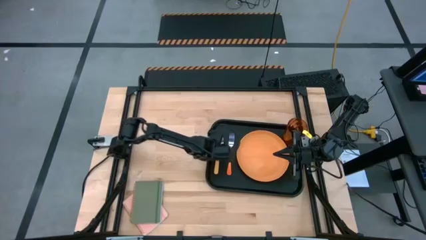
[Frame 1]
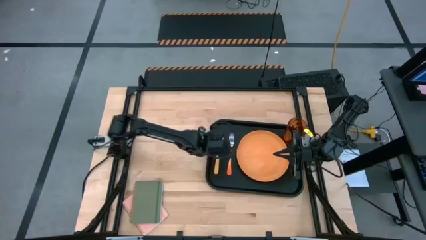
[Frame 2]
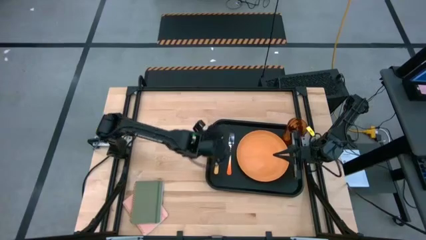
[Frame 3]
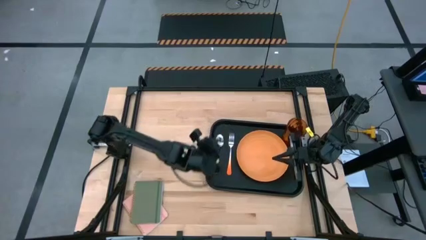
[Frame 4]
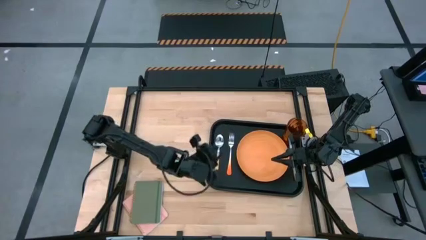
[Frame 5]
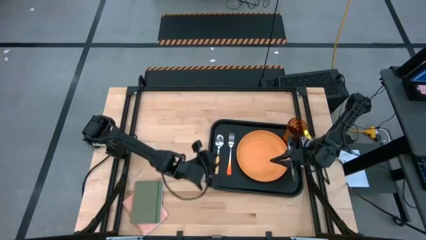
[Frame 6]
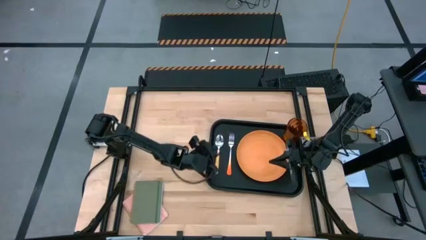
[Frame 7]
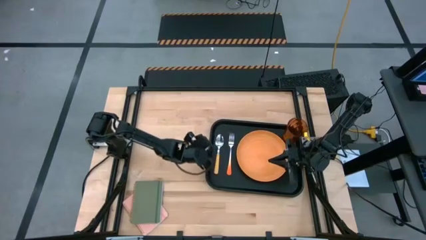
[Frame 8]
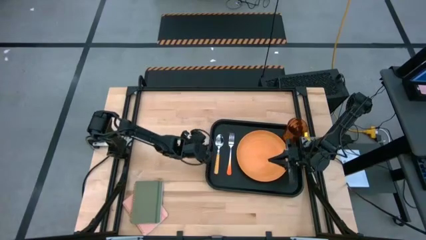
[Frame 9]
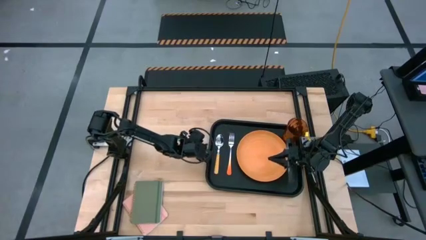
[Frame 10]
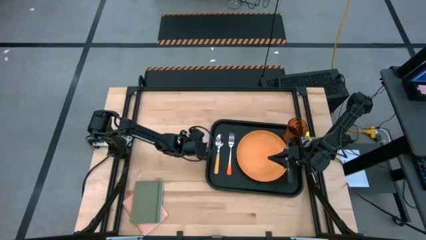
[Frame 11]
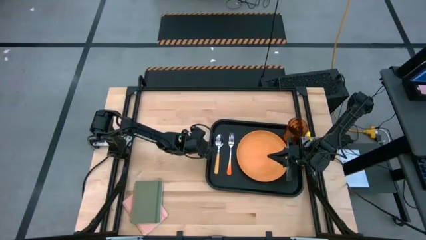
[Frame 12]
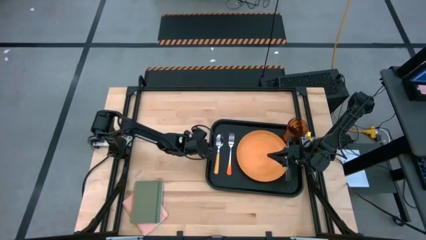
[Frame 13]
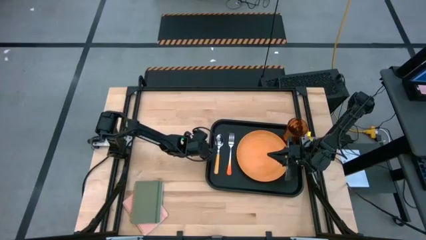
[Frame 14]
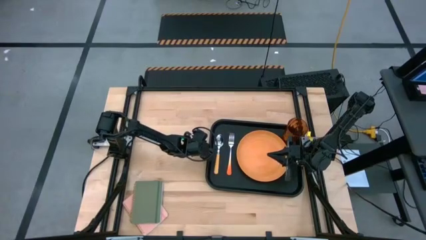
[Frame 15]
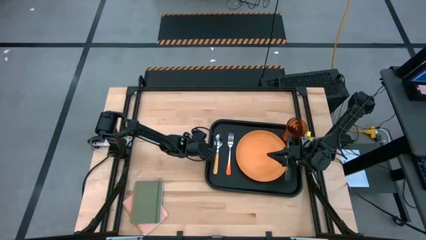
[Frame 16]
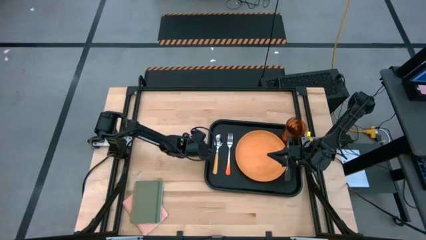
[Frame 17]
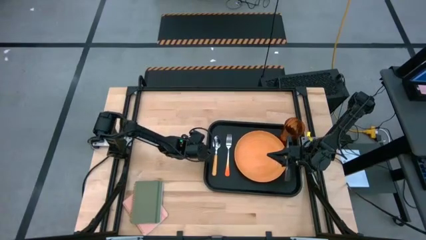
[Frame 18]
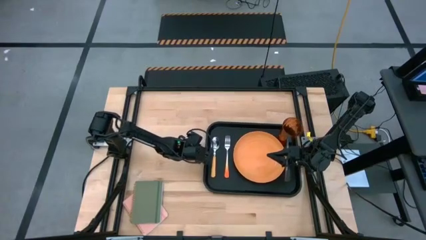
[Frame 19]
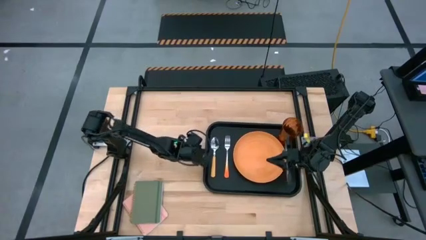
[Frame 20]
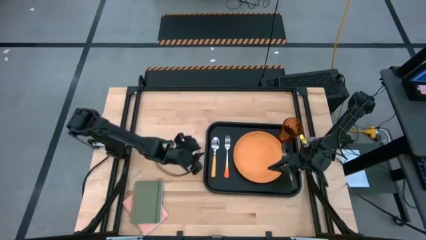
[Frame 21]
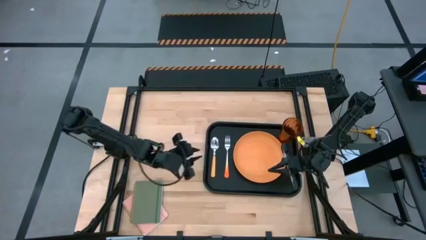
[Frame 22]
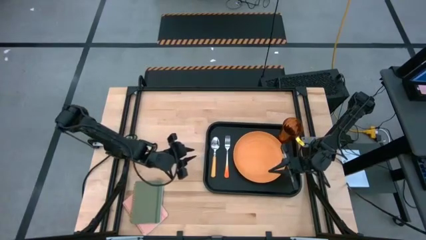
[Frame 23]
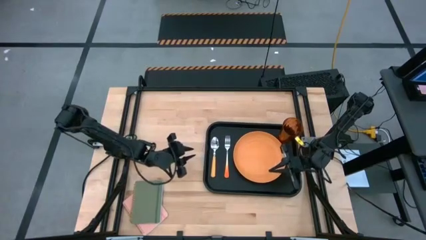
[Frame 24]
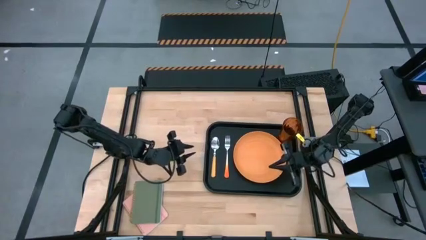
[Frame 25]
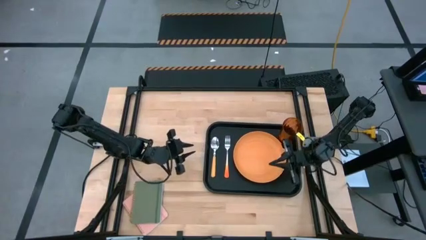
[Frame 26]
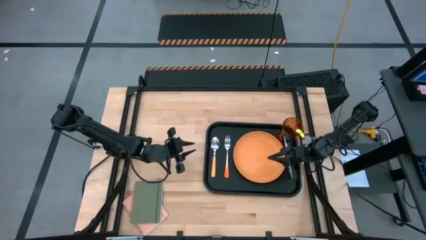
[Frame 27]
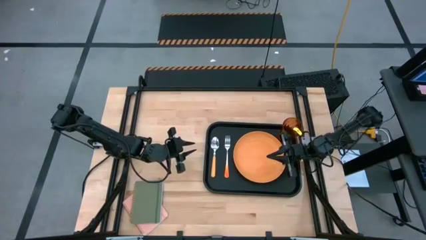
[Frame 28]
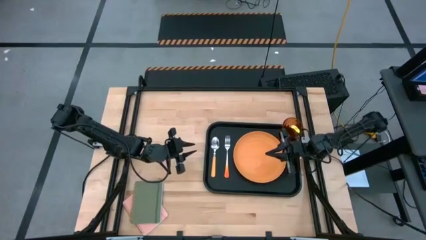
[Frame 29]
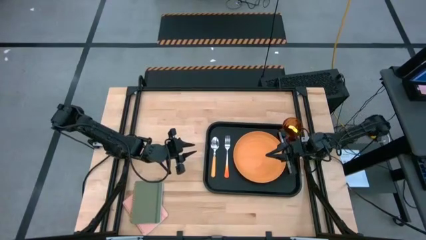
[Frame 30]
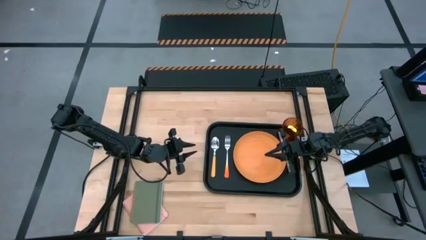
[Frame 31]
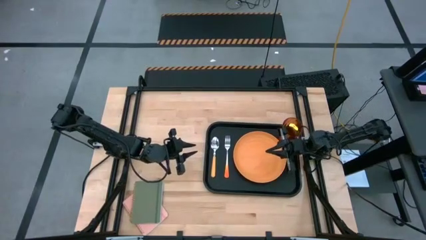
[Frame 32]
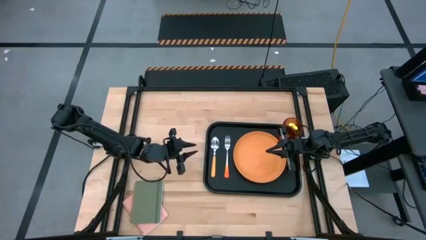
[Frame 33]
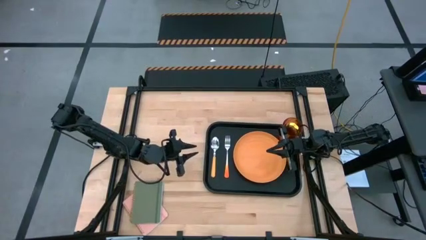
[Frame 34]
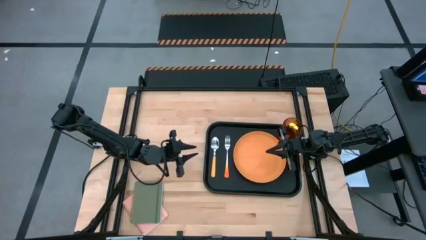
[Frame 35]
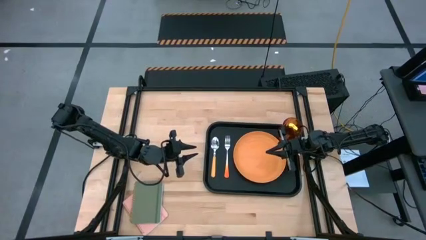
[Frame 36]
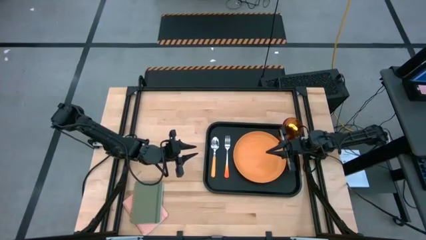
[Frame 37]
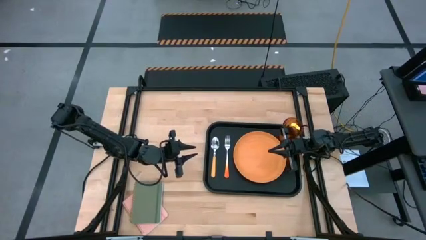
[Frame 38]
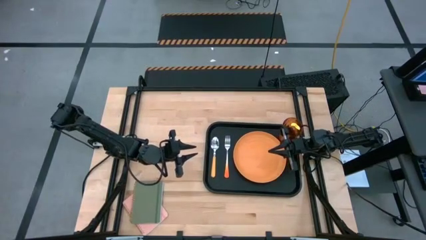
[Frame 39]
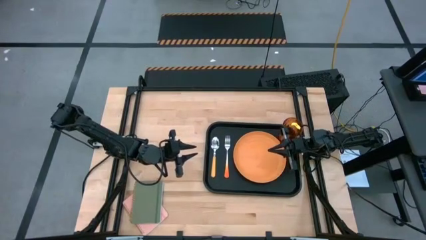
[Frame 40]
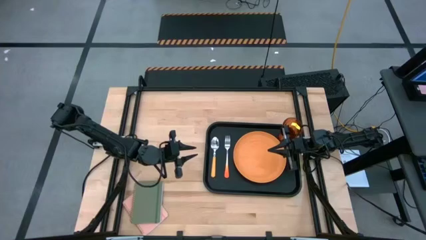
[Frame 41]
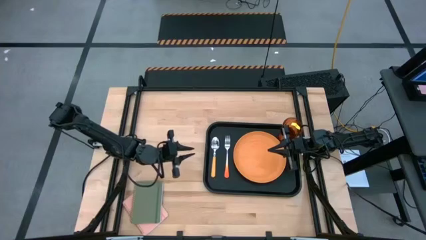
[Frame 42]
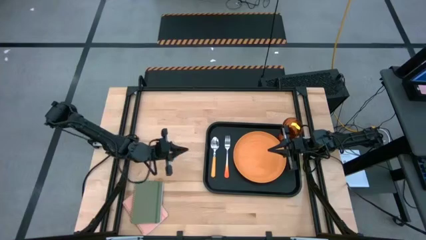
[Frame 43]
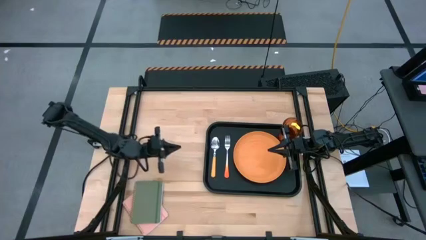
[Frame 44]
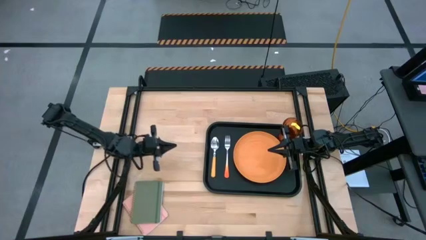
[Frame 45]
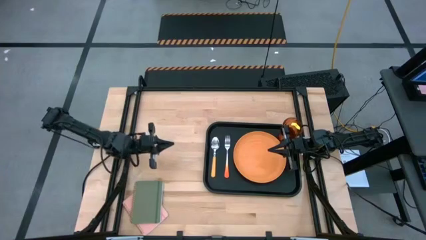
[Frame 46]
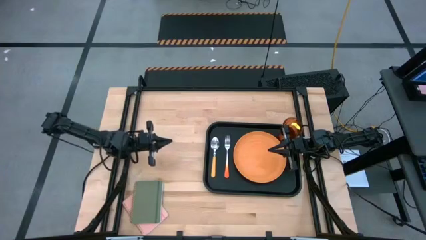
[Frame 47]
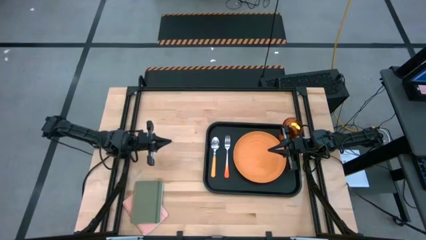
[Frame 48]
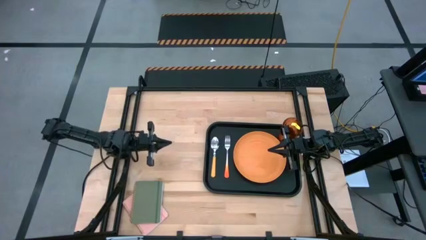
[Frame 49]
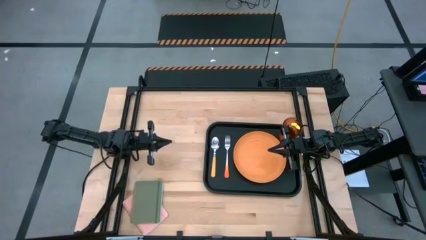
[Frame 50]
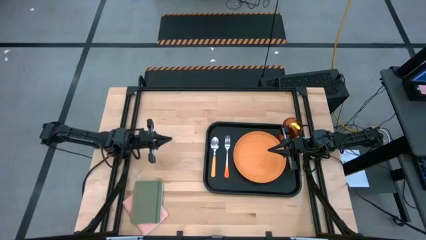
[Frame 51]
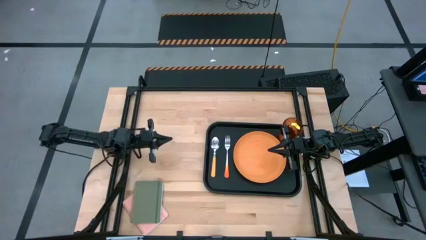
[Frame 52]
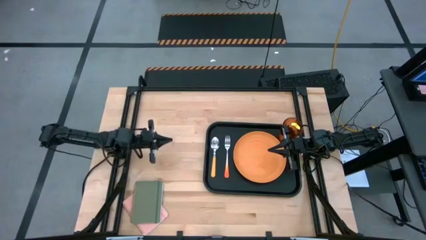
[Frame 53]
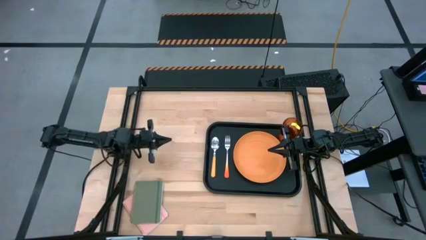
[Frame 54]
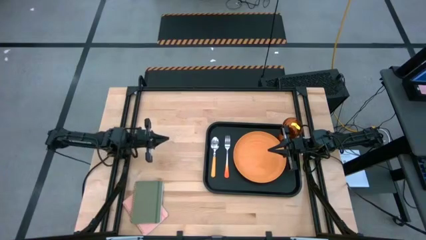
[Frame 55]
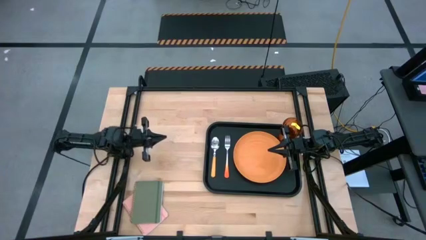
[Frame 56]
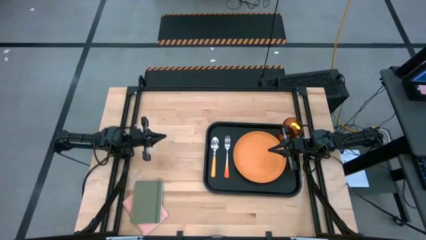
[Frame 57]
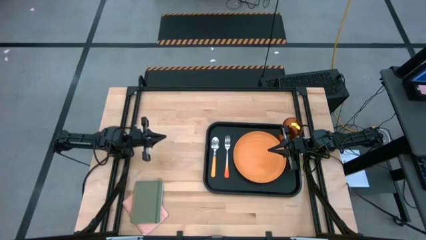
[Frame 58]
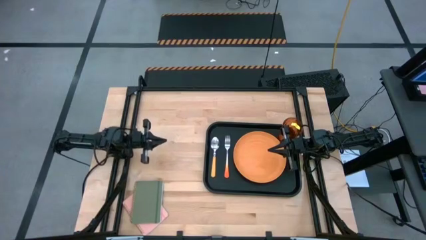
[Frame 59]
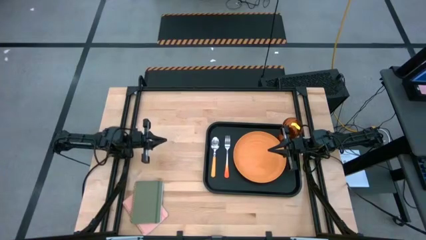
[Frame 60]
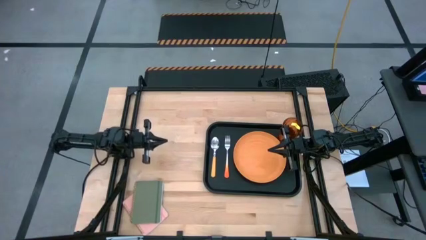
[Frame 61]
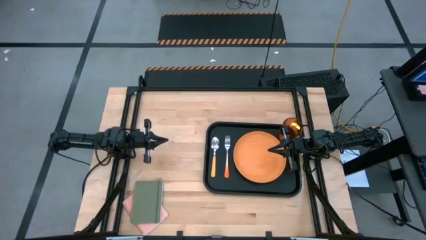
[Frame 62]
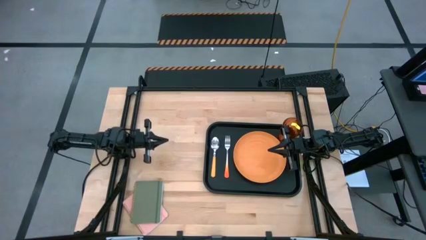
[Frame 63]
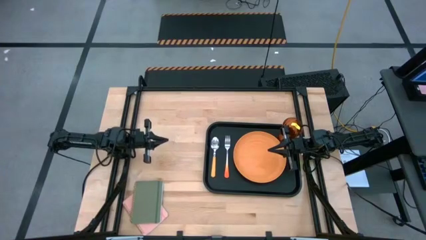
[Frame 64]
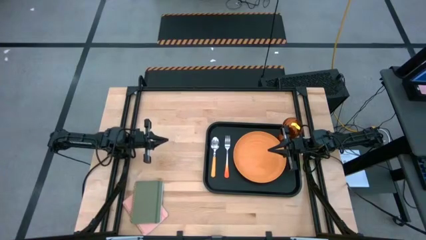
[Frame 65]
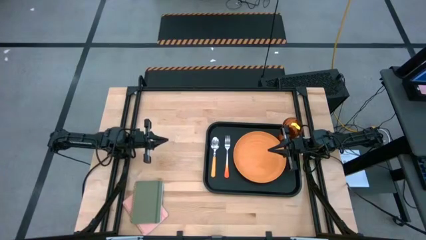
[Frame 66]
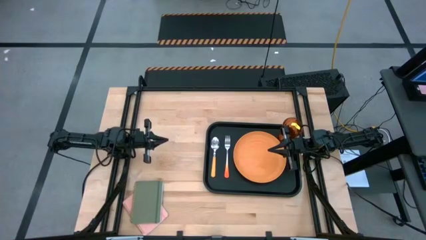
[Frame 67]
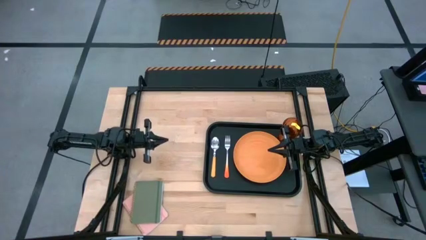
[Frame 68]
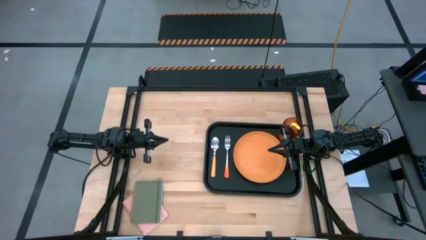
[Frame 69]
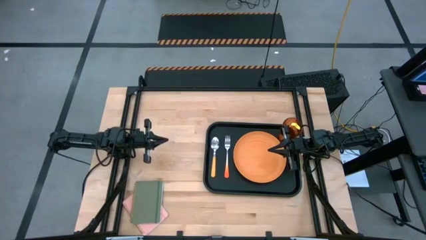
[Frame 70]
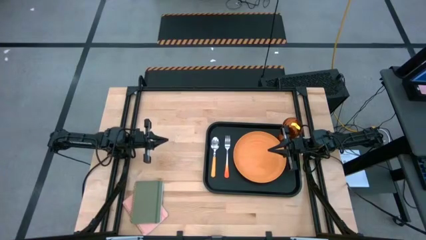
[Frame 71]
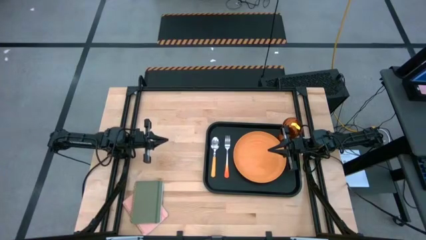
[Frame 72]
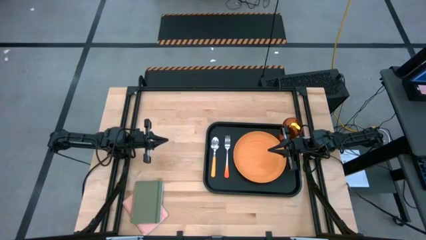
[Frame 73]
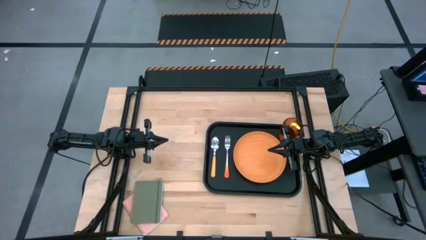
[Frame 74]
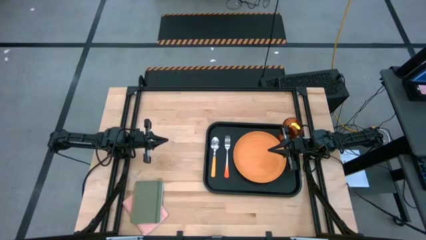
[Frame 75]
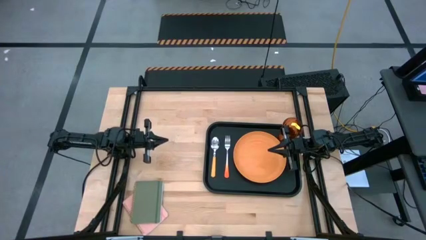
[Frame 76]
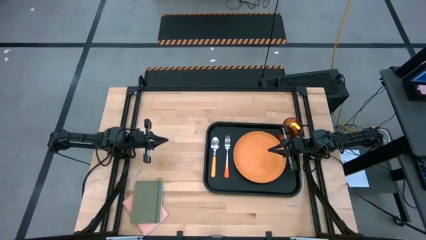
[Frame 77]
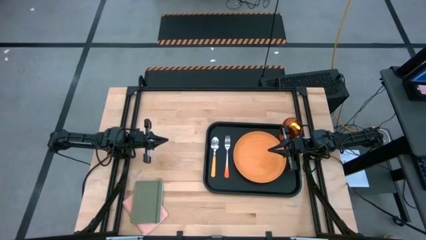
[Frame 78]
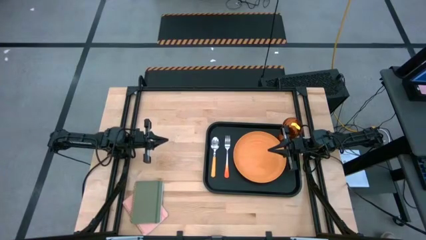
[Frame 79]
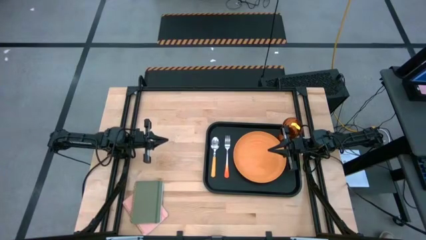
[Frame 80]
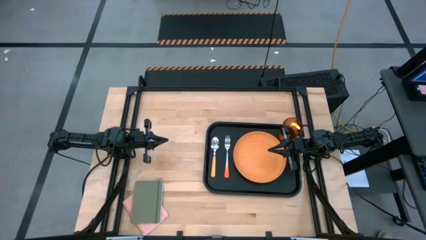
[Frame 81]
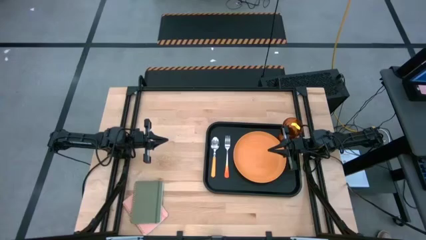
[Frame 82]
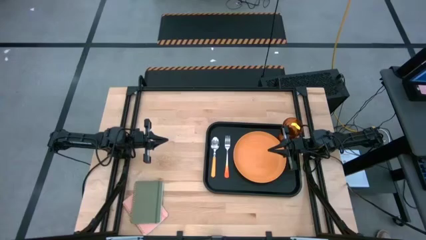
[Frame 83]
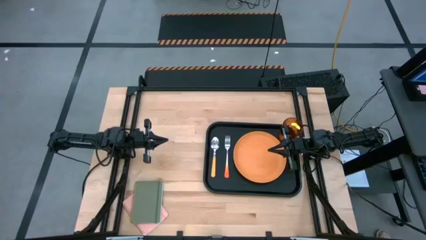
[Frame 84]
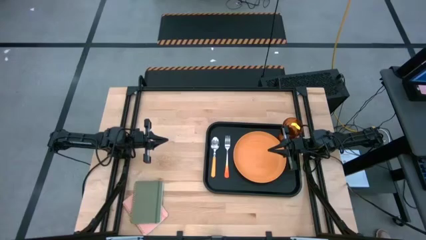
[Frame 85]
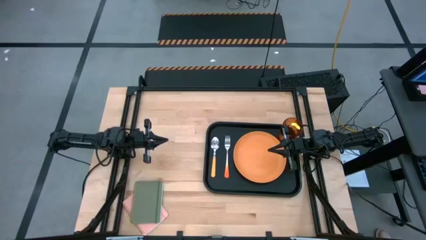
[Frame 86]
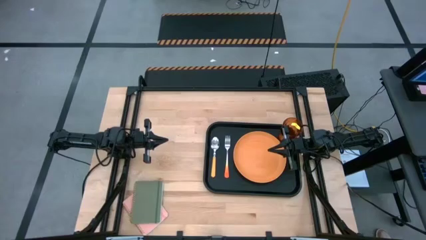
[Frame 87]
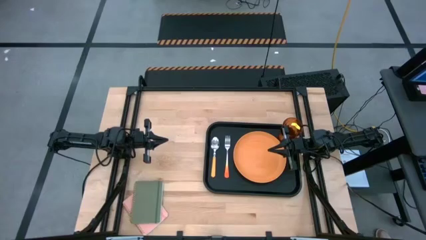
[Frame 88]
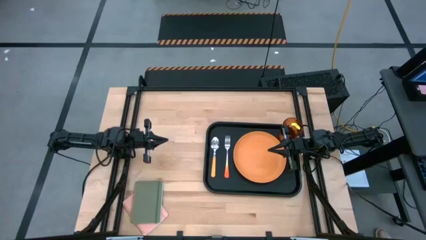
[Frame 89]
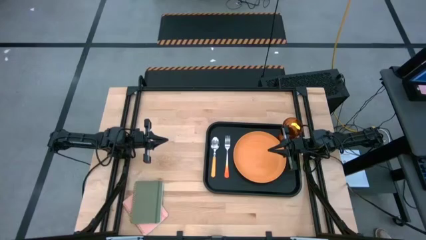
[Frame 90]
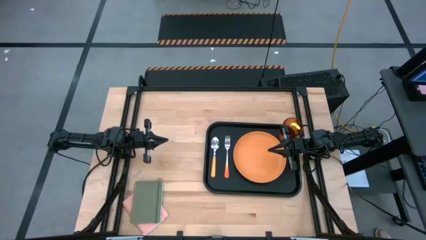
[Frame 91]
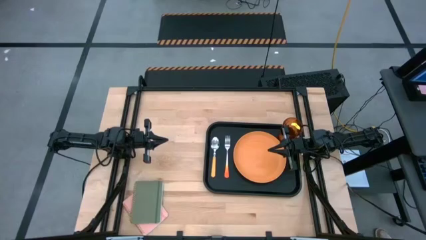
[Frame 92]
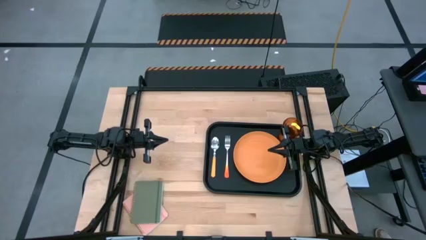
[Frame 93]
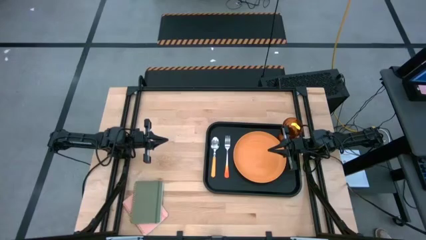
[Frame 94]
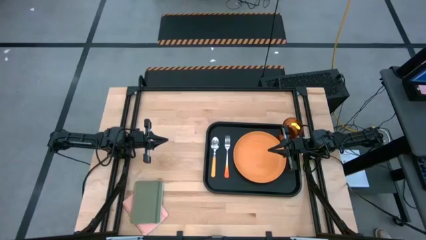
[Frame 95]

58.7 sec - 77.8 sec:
Task: Pick and place plate/cup/fork/spoon on tray
Return to Home Position
